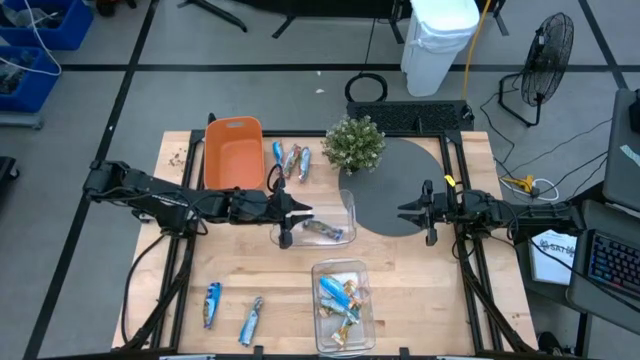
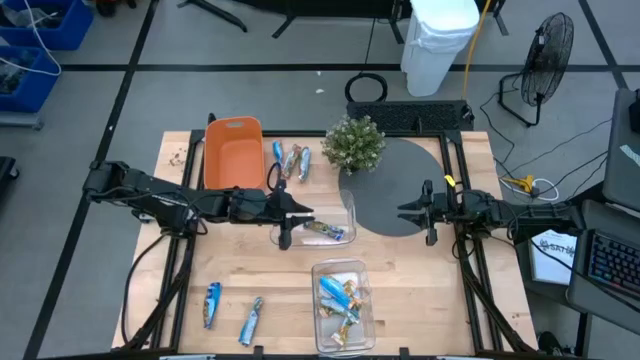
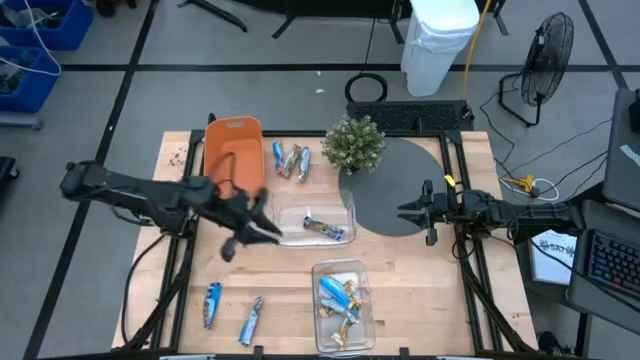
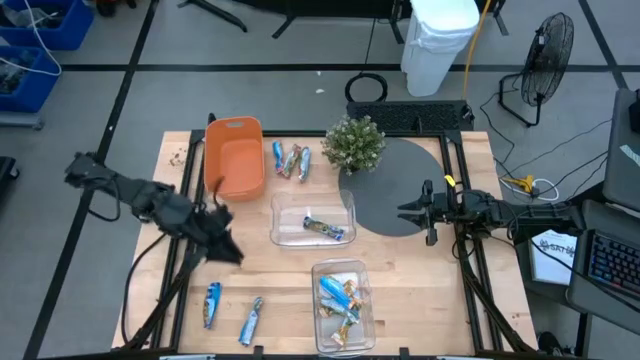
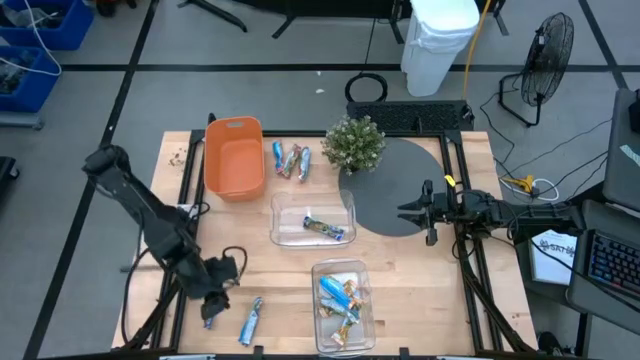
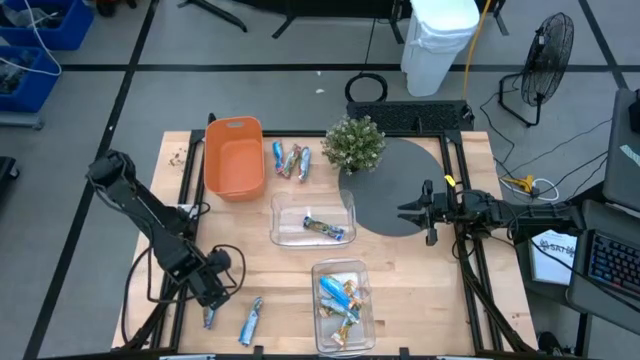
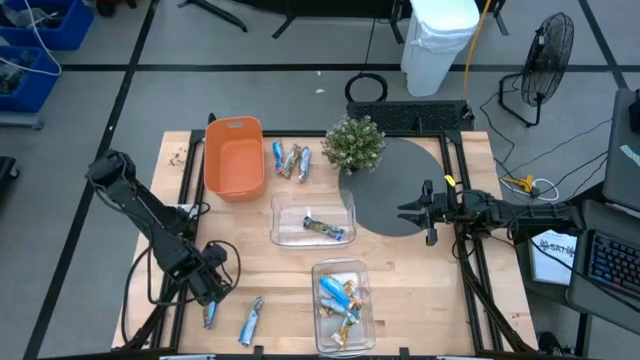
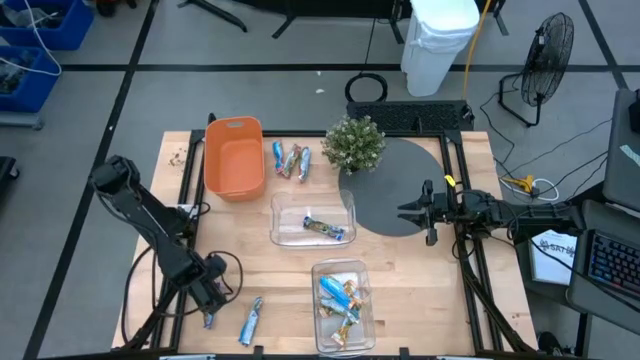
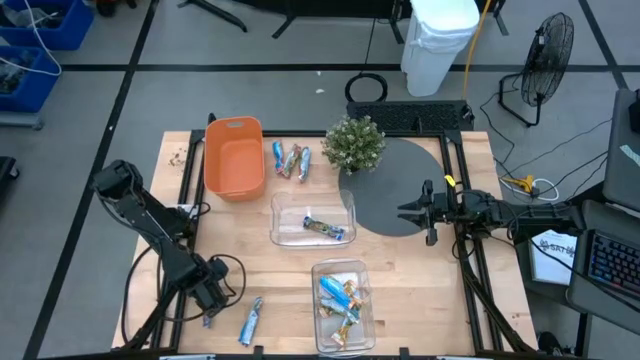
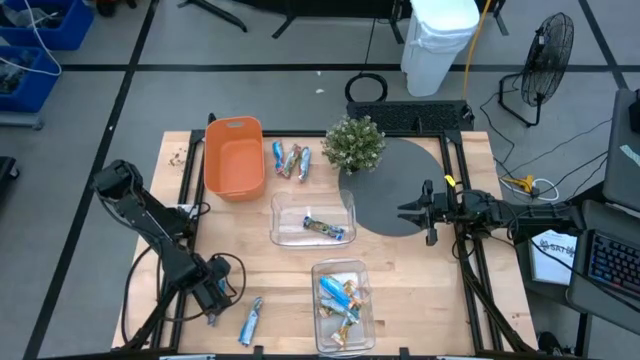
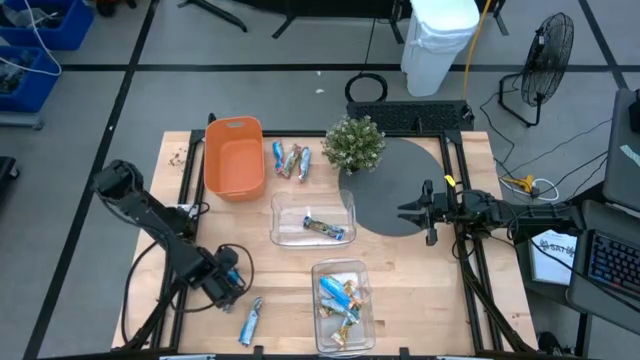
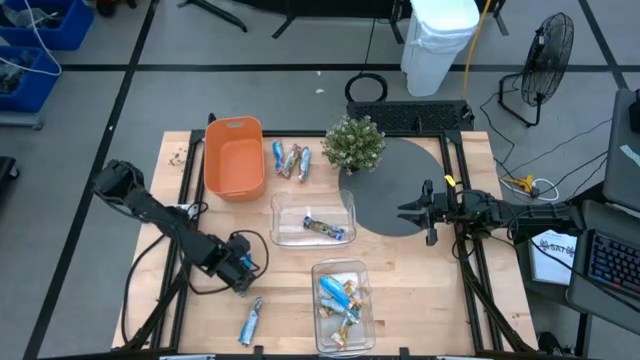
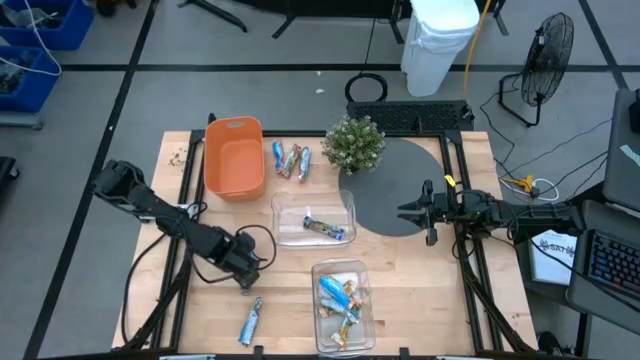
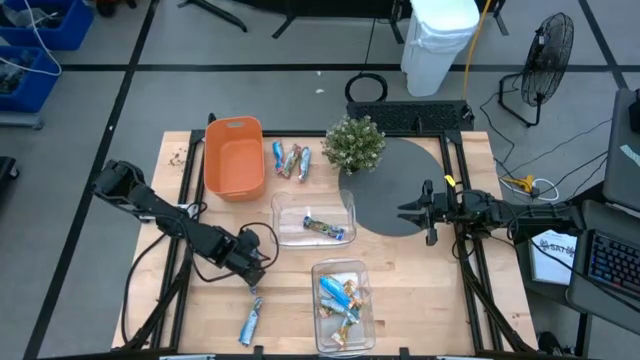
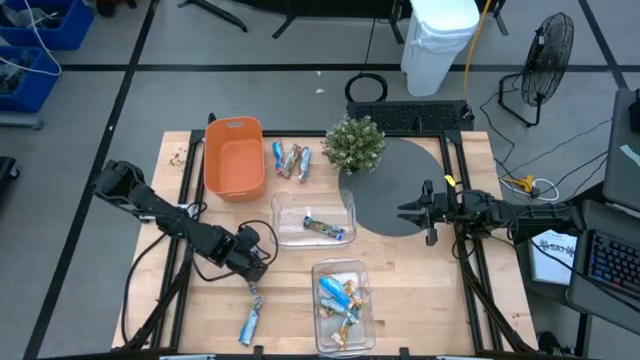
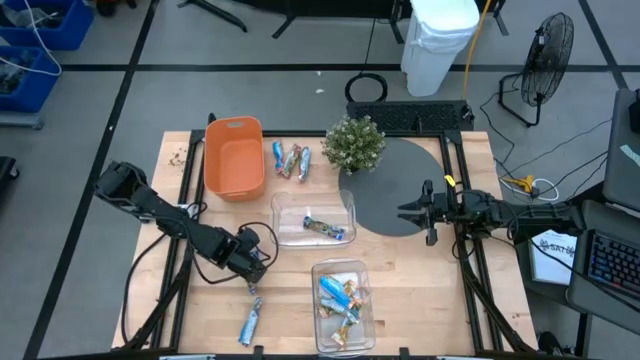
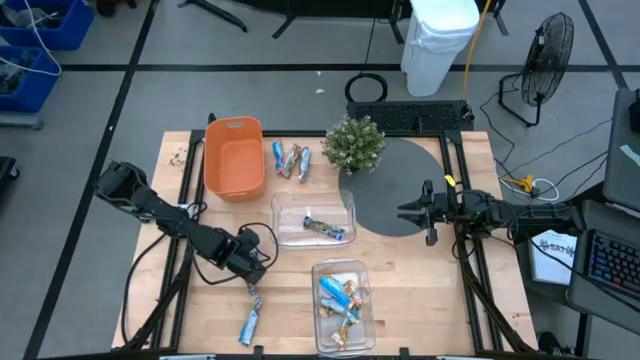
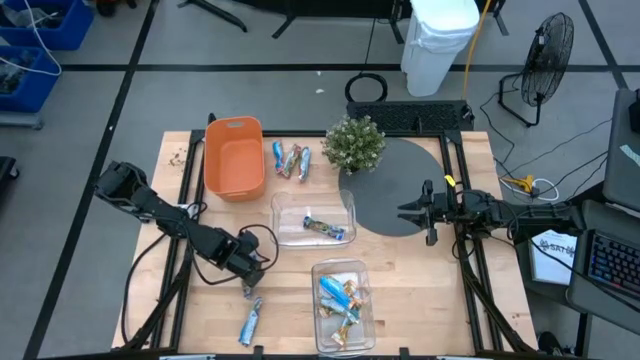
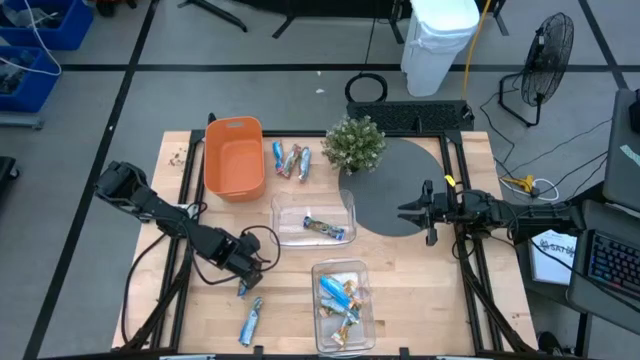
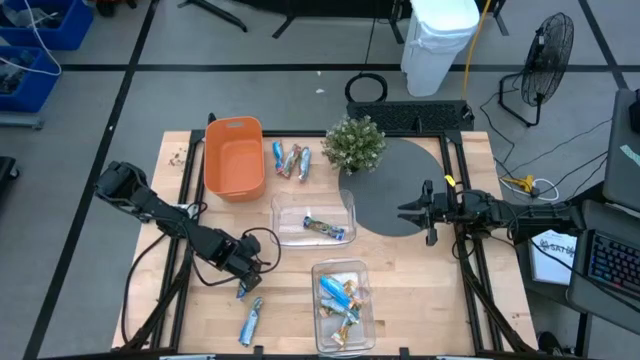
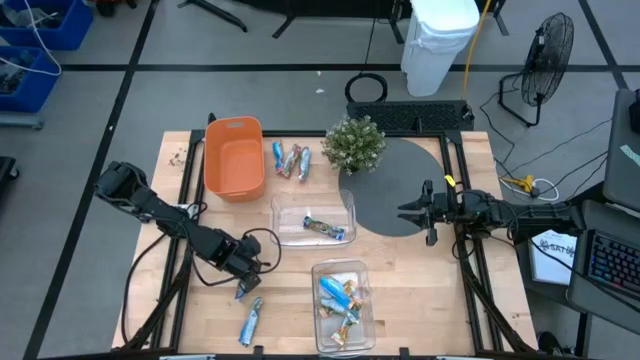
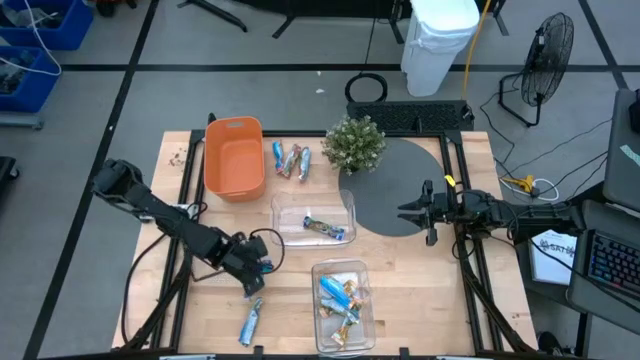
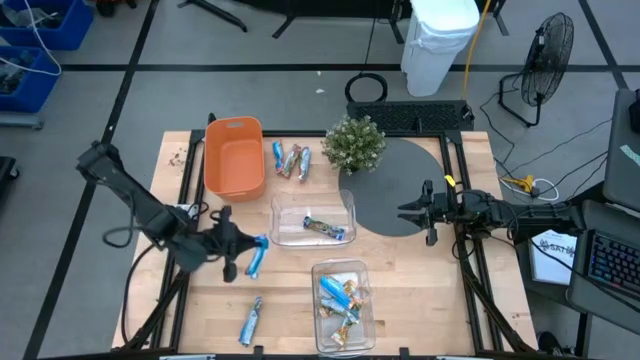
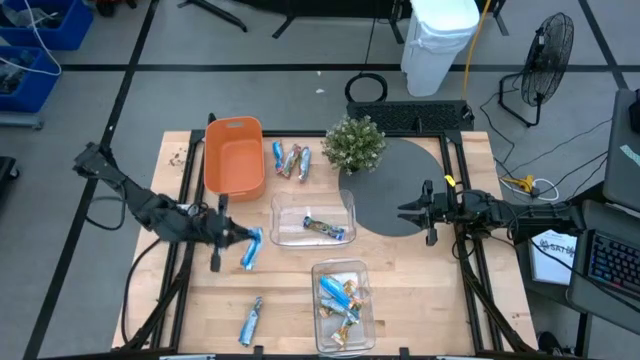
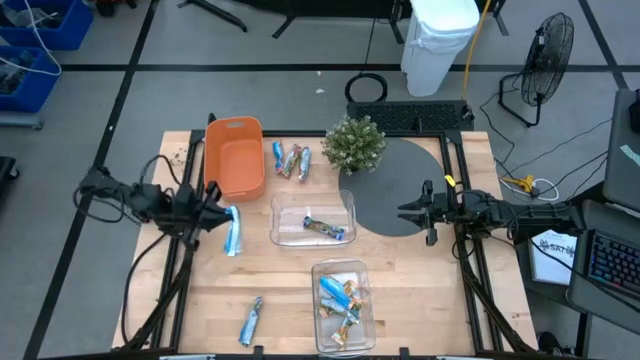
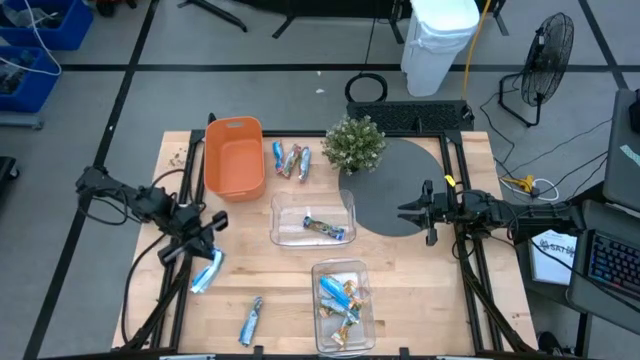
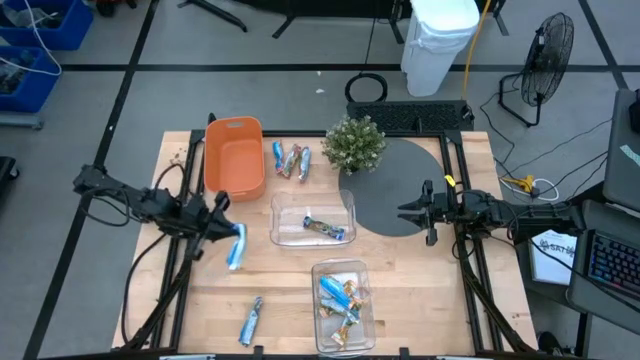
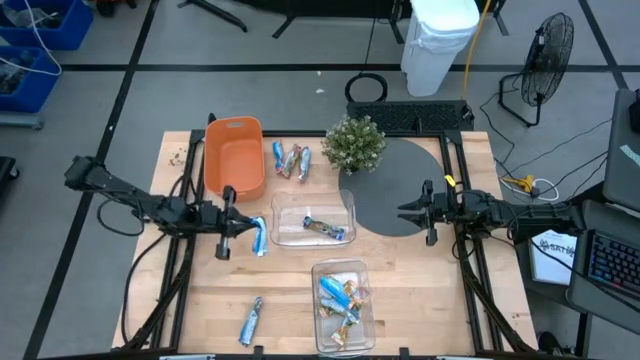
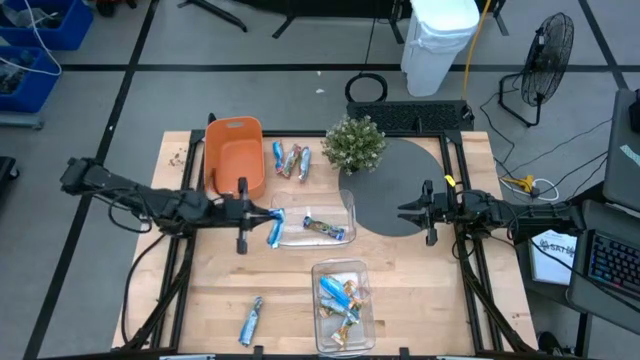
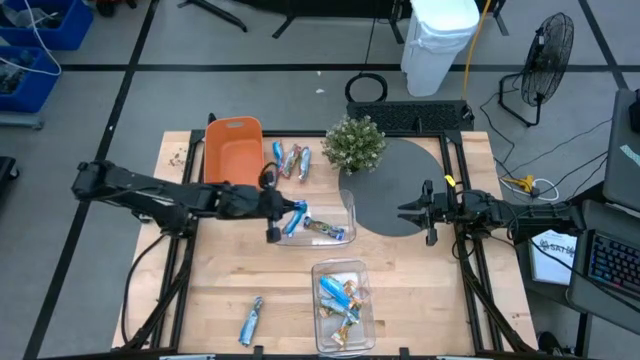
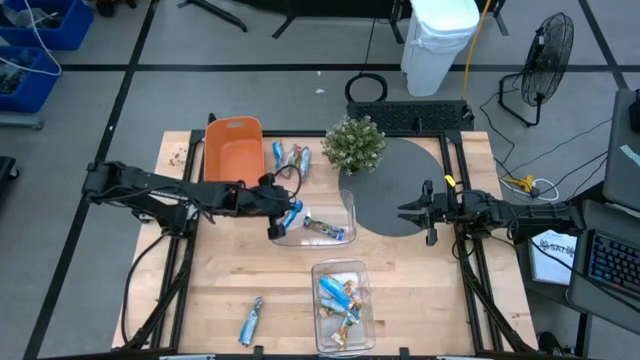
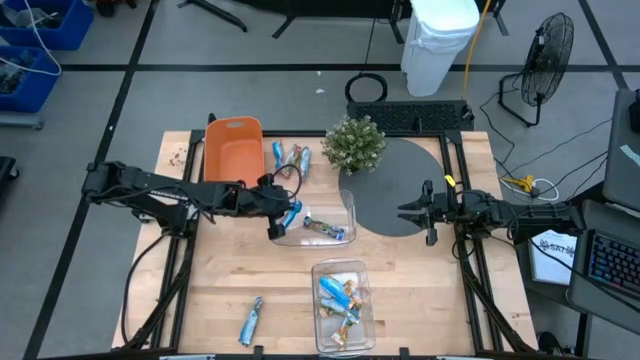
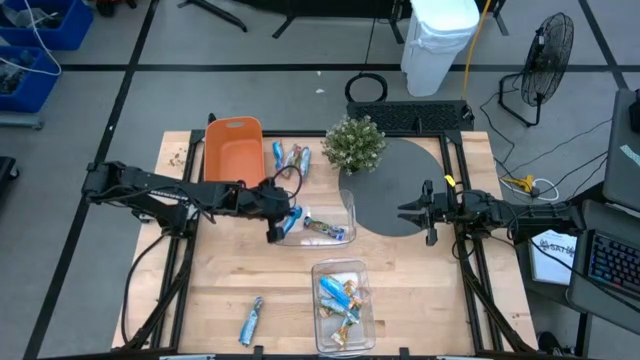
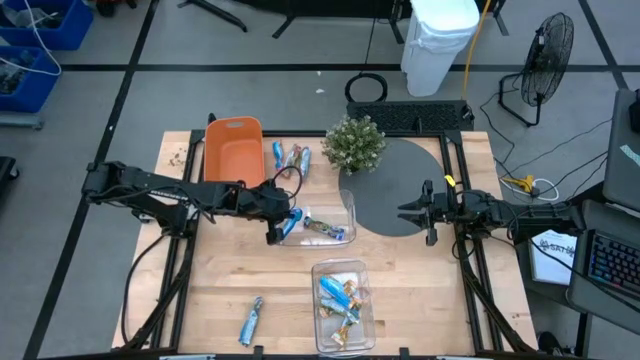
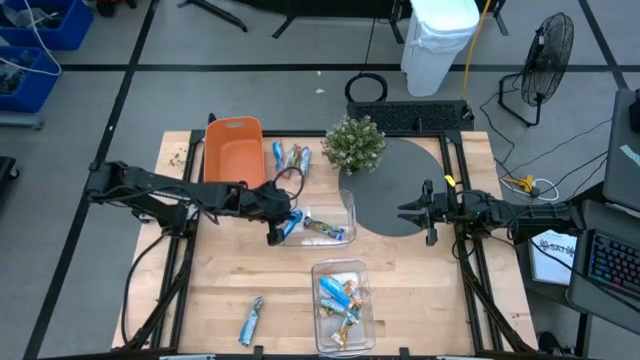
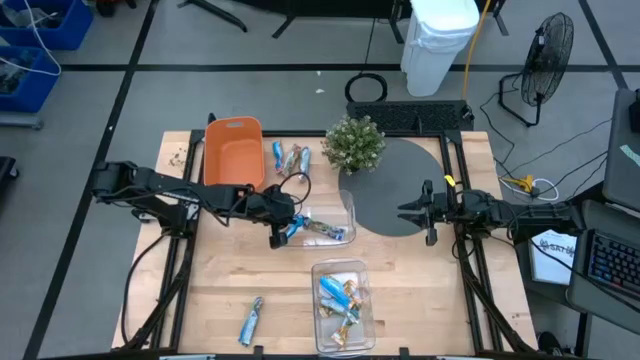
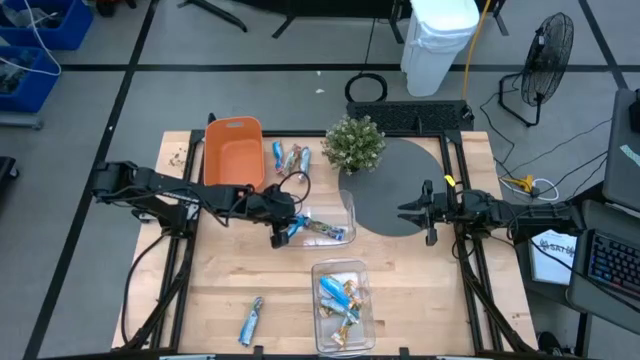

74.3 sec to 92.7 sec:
Task: Pick and place Granola Bars by type
Put the purple granola bar into the top transparent bin

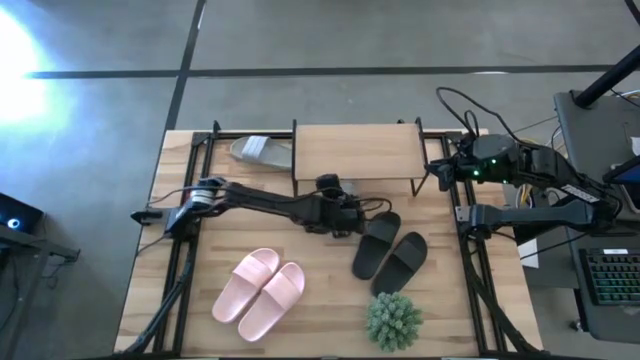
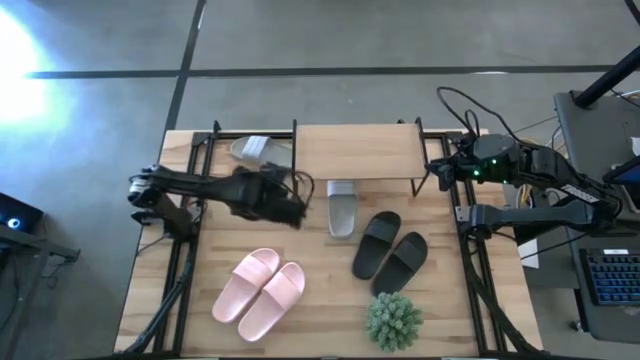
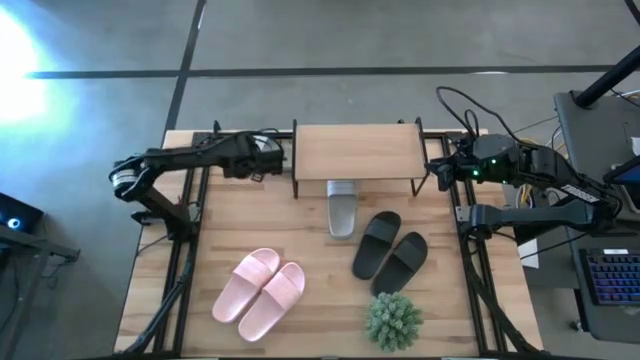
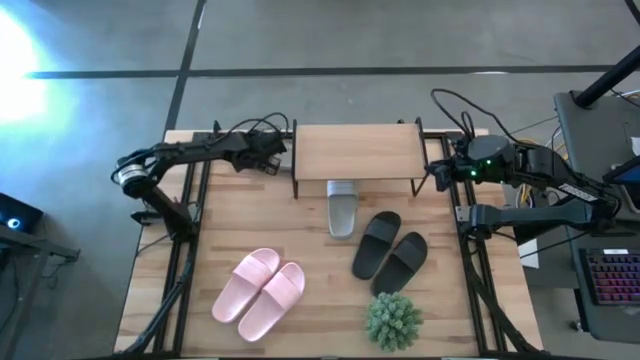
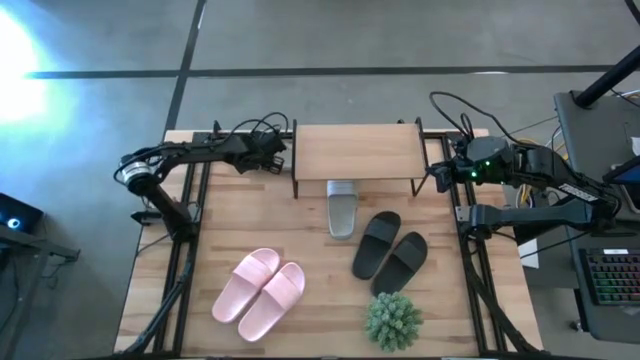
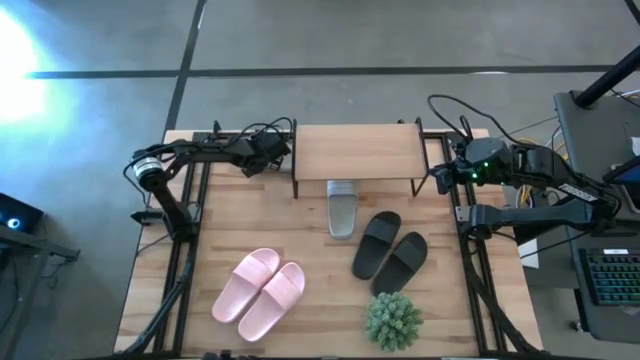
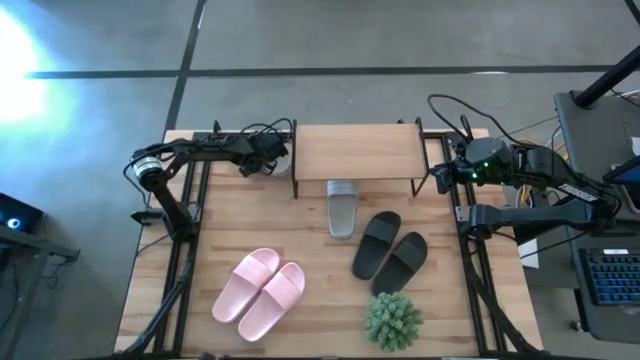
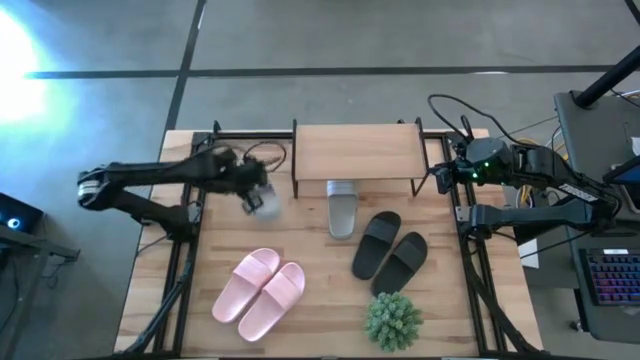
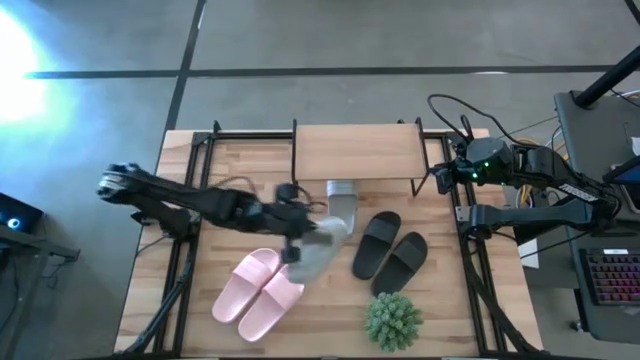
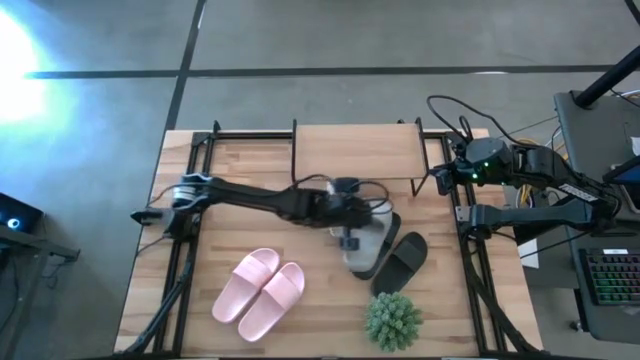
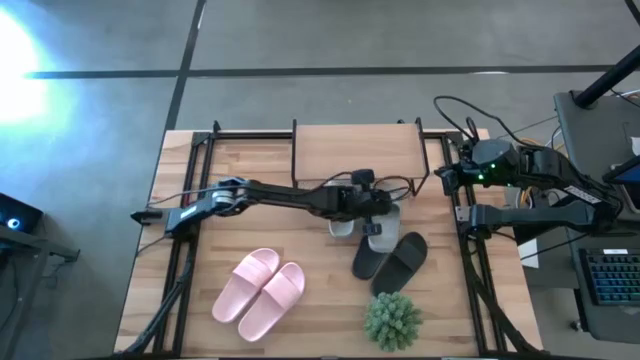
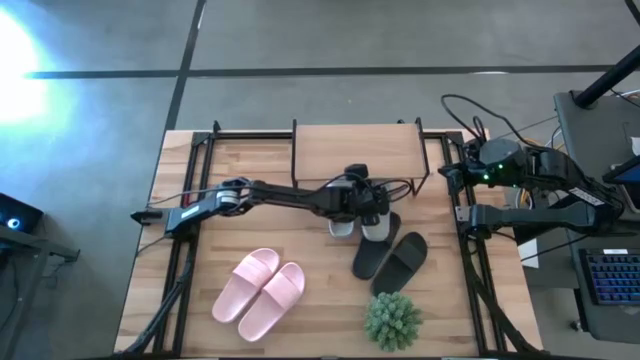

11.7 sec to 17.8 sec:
Task: Pick and place slides into the shelf
Put the gray slides under the shelf
